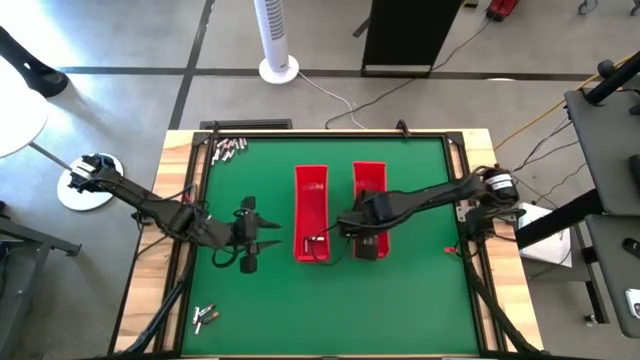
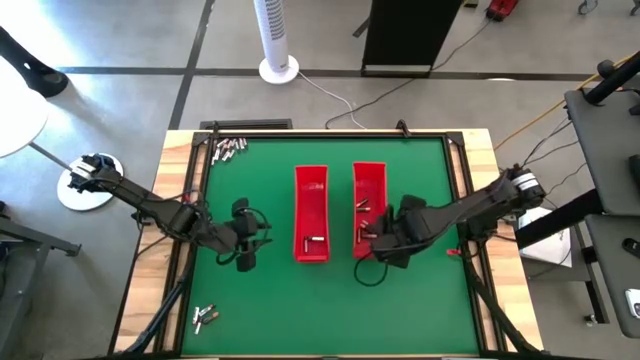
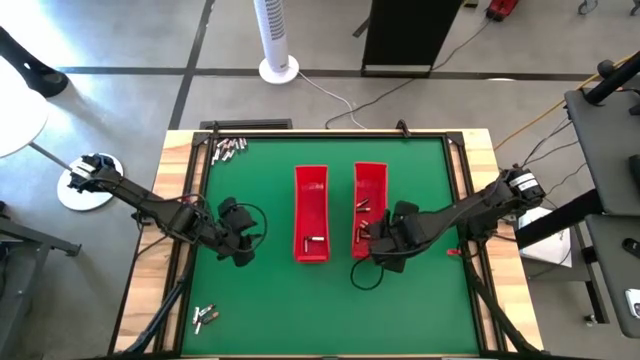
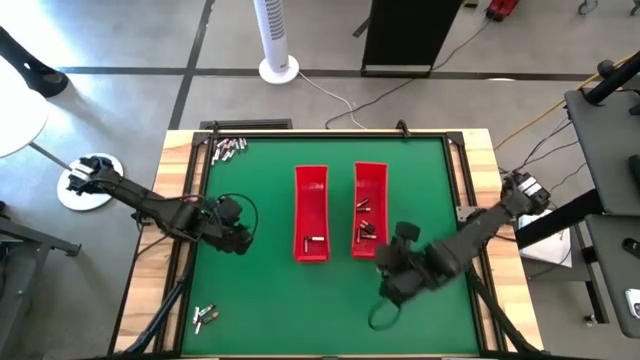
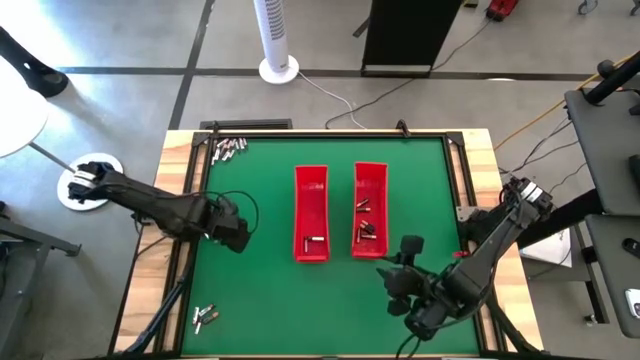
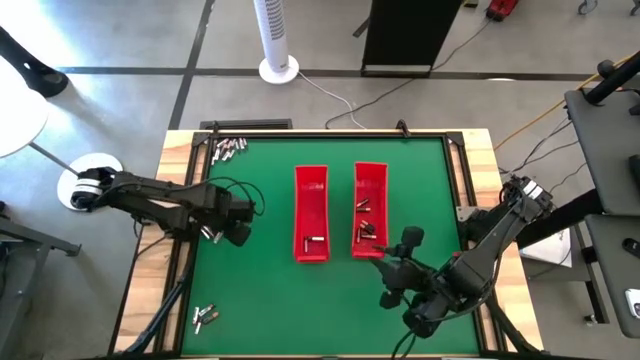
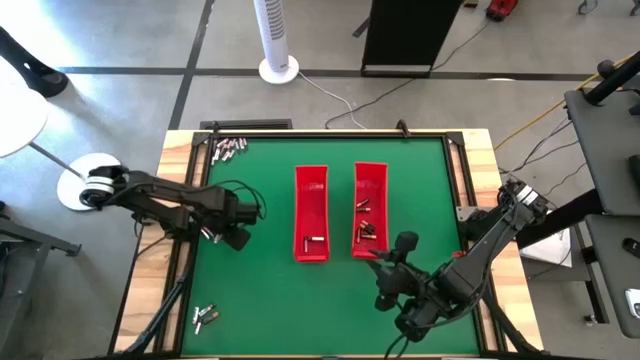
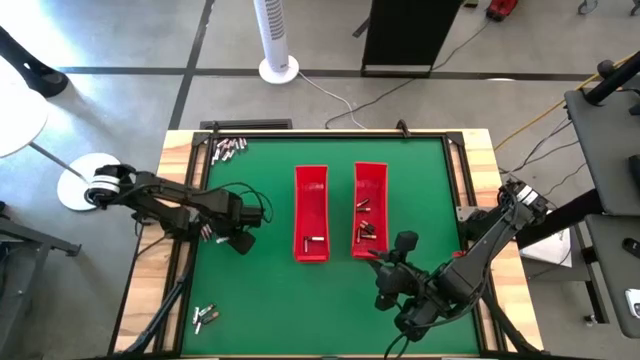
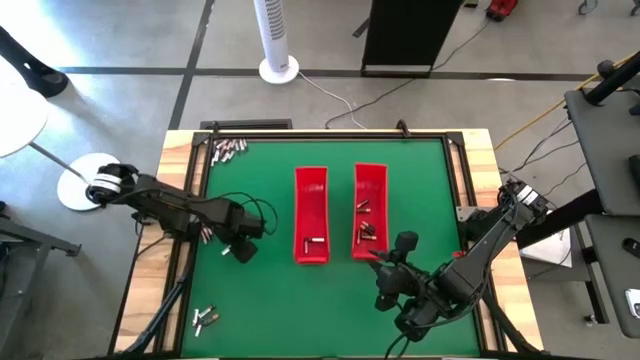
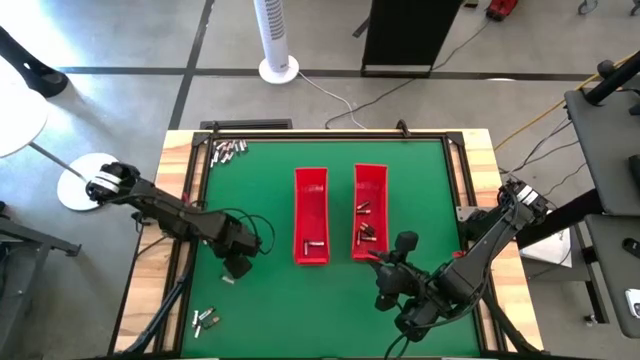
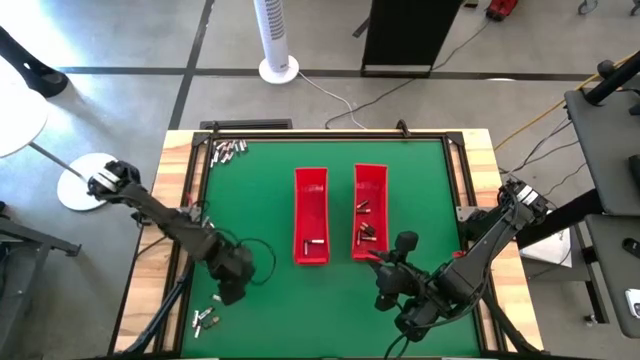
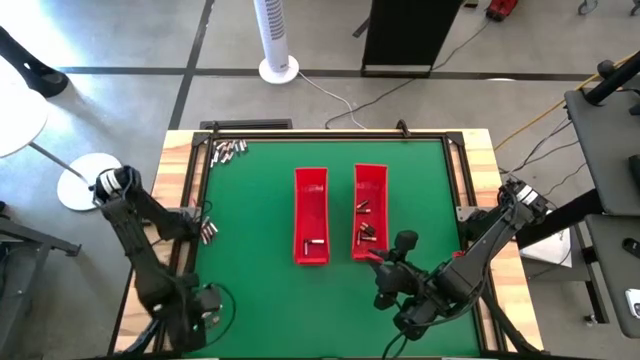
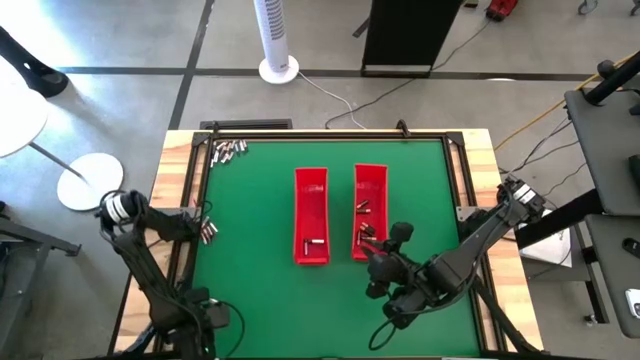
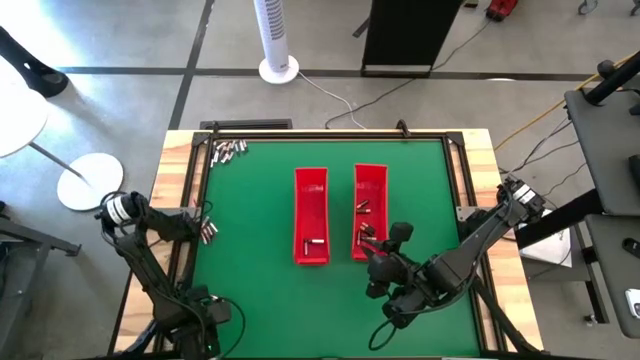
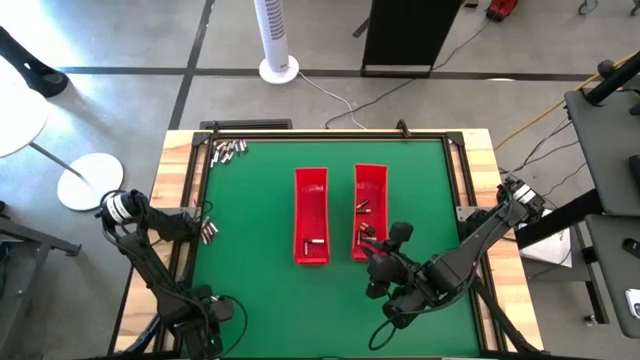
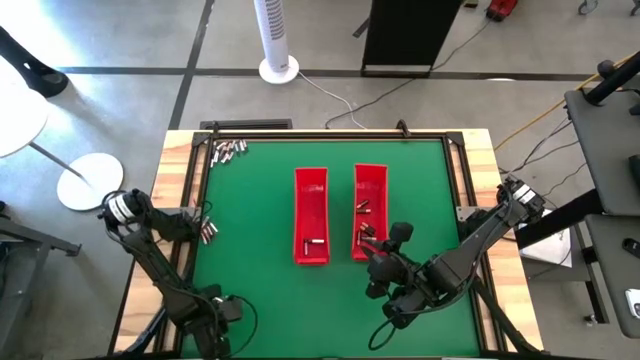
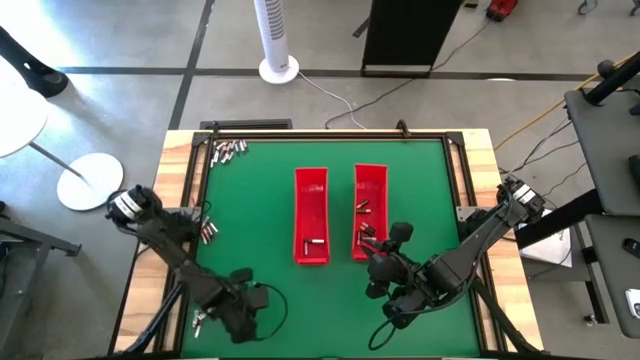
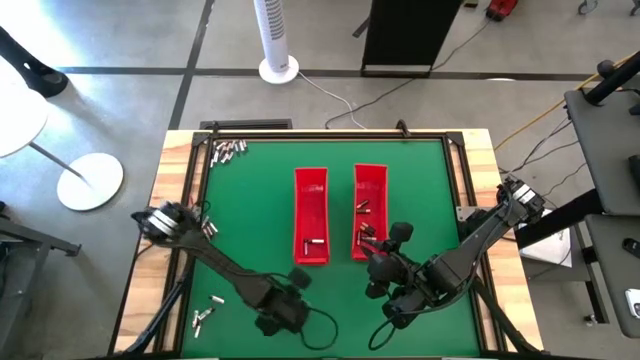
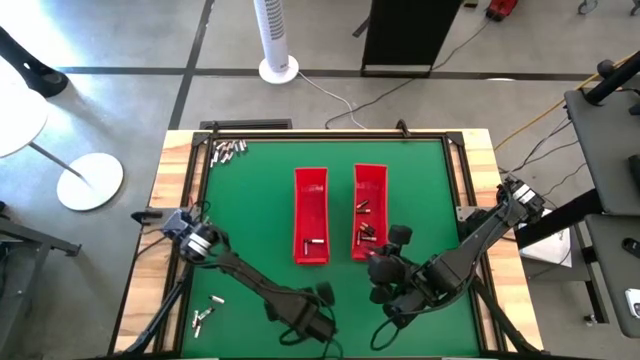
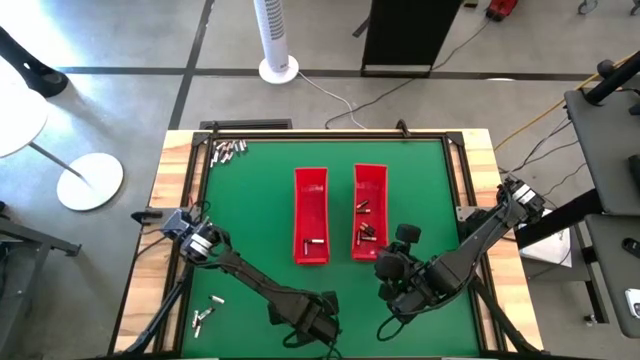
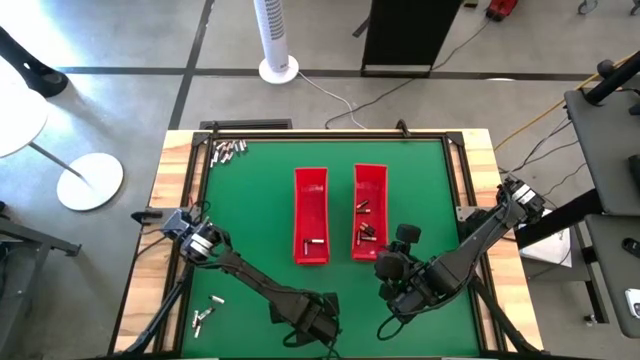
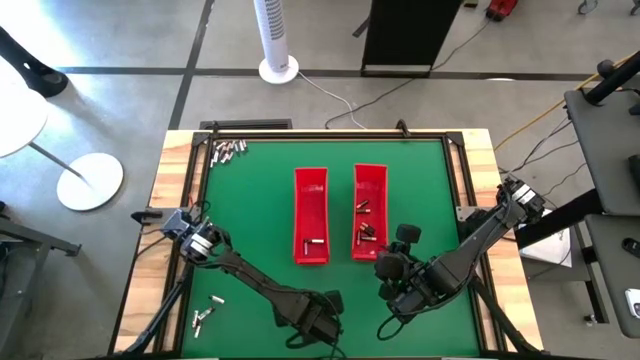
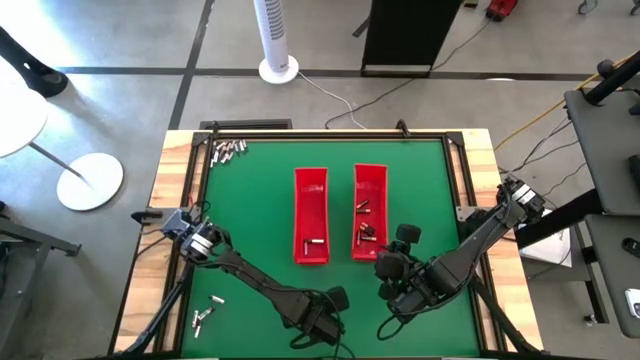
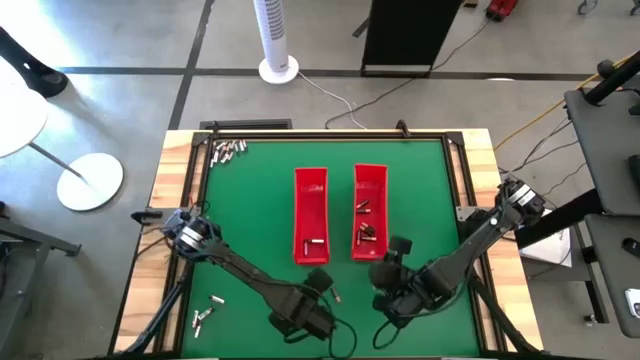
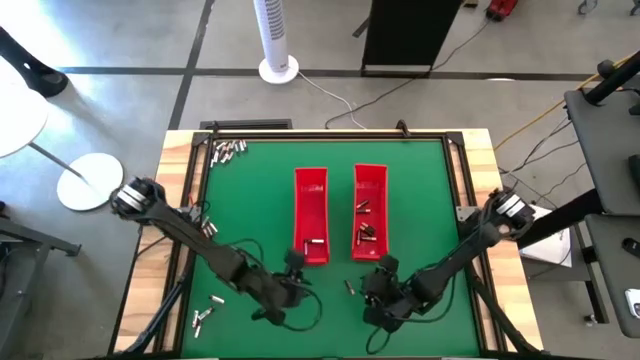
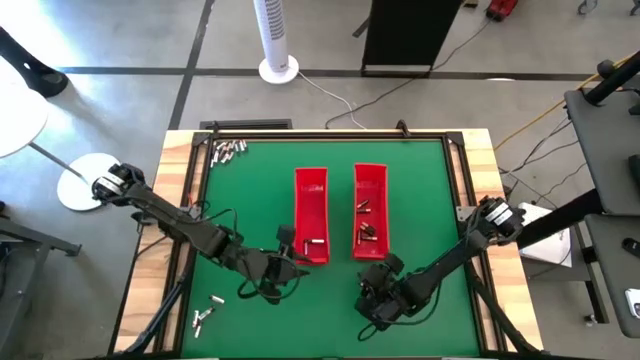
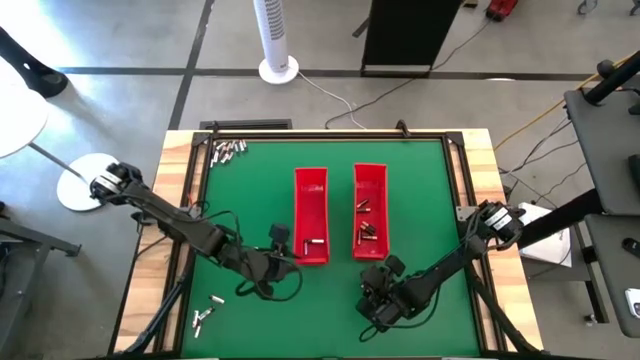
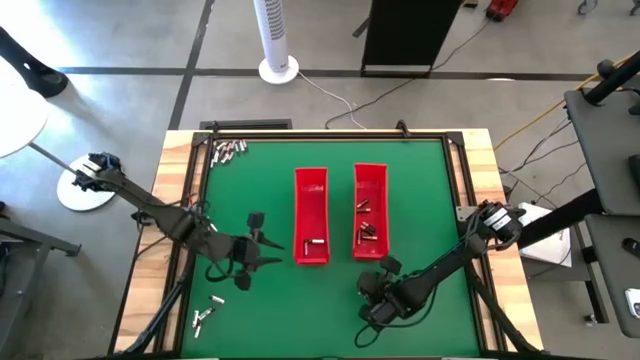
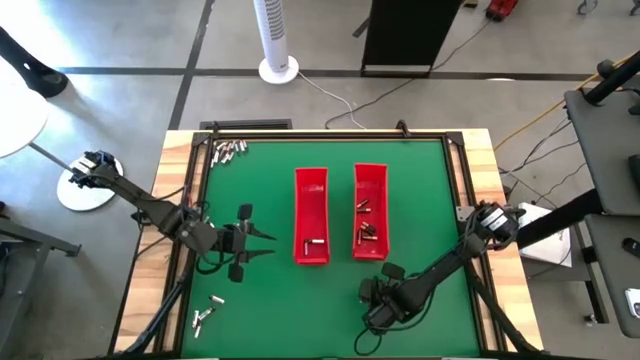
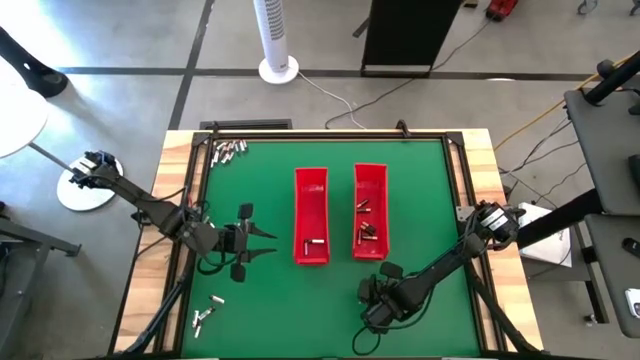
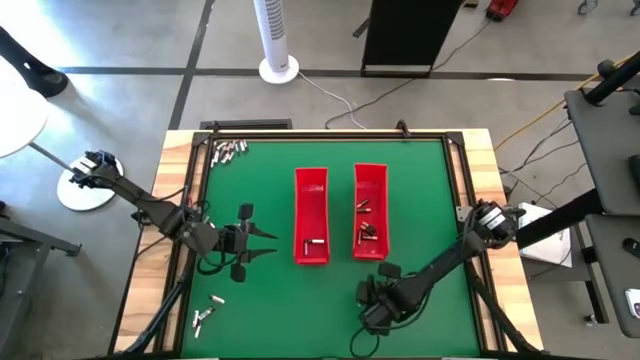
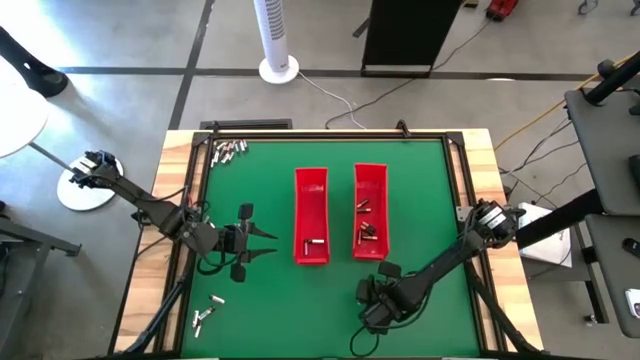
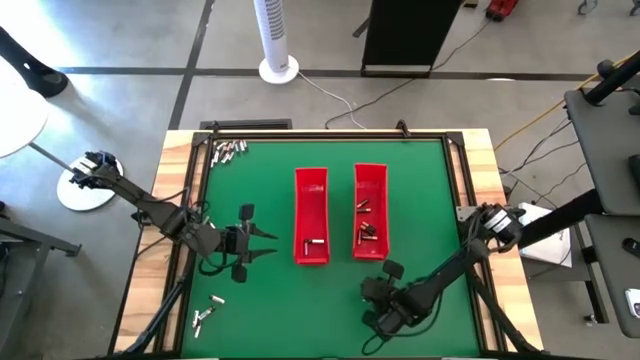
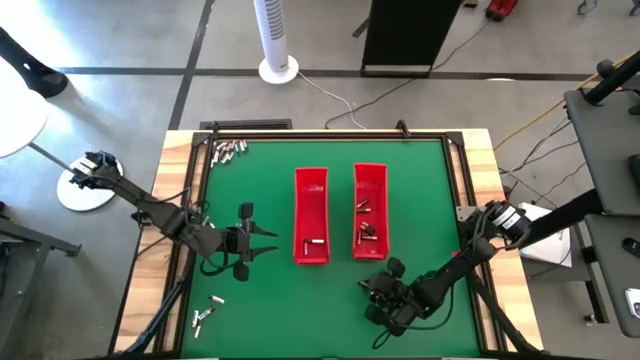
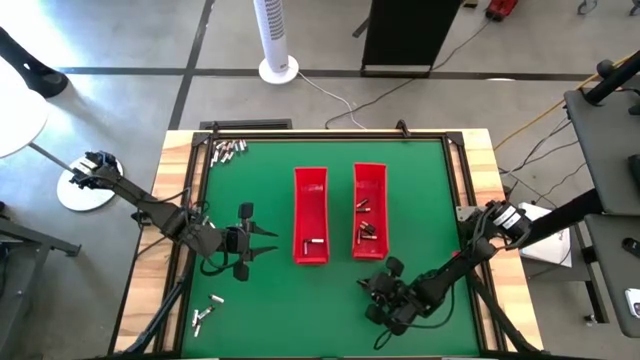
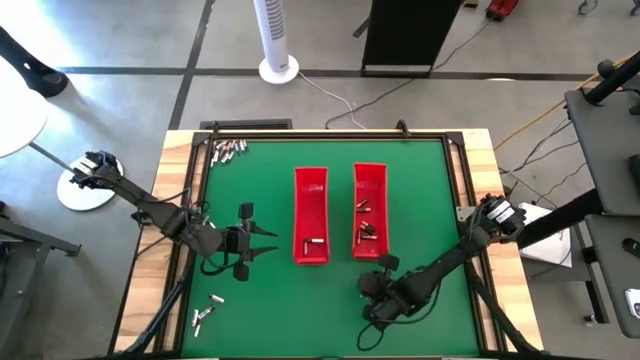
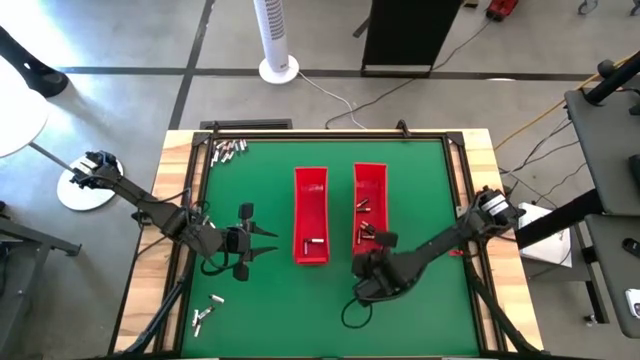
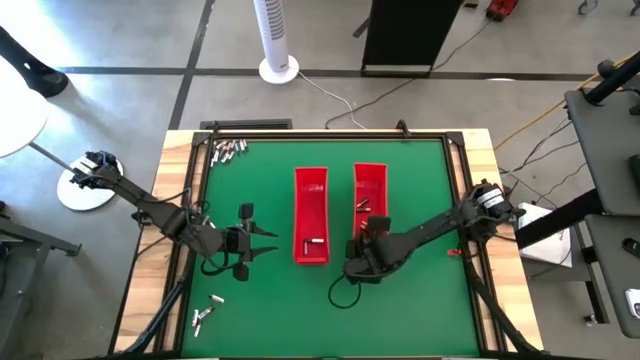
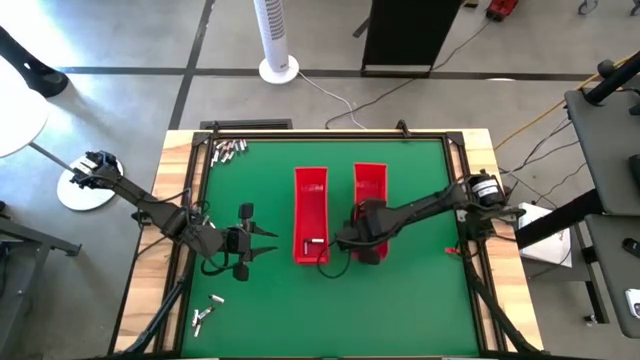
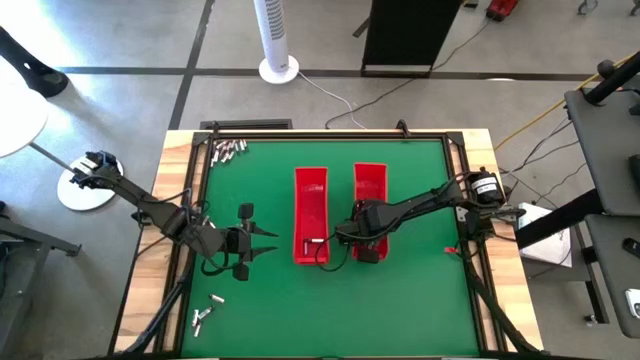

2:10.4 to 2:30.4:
Task: Sort batteries
Put the black battery into the right red bin
